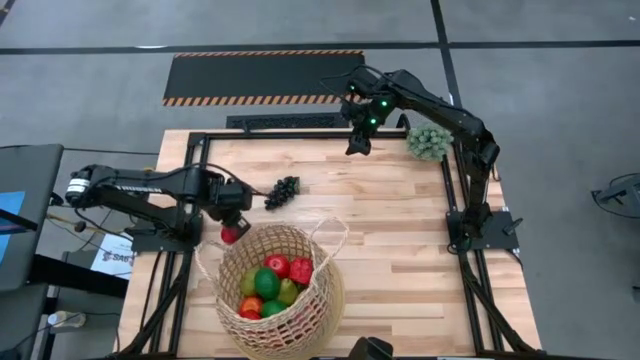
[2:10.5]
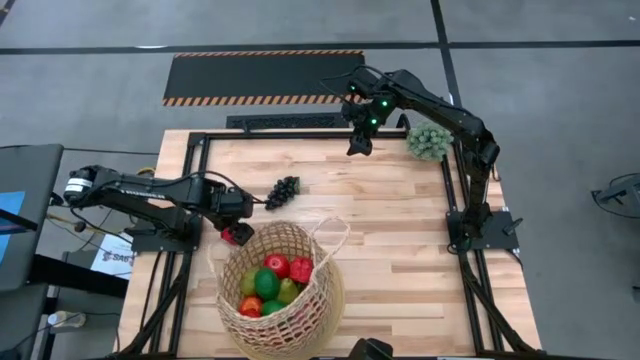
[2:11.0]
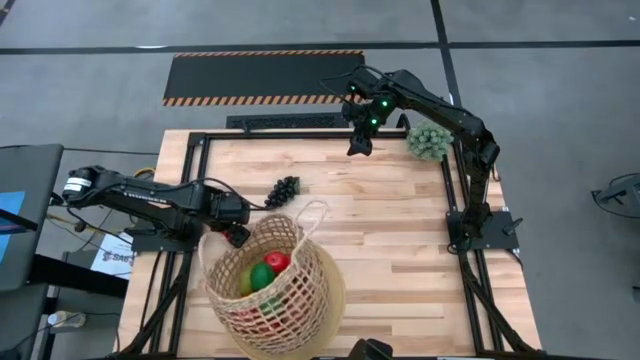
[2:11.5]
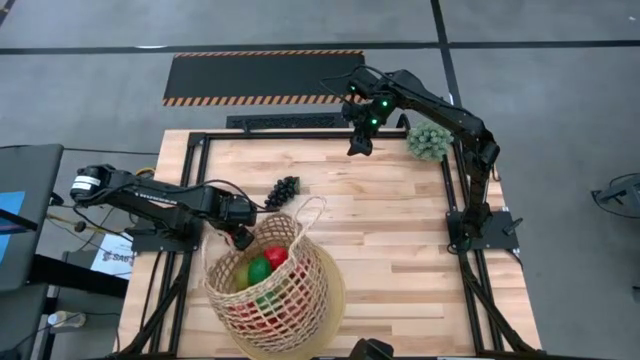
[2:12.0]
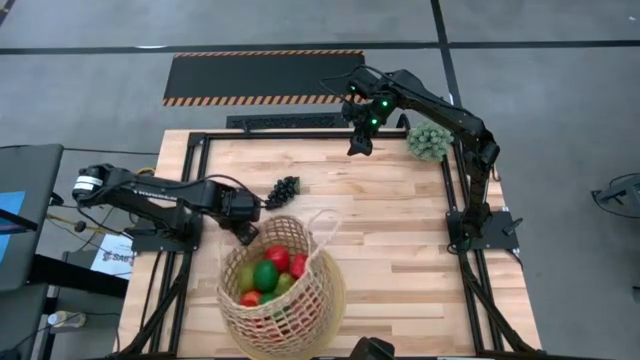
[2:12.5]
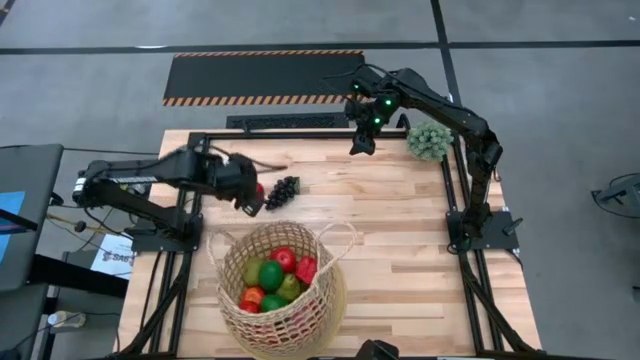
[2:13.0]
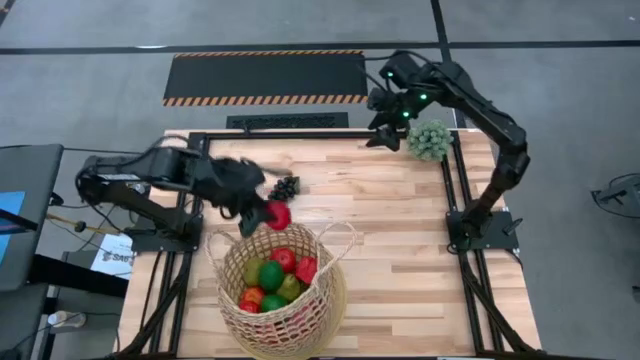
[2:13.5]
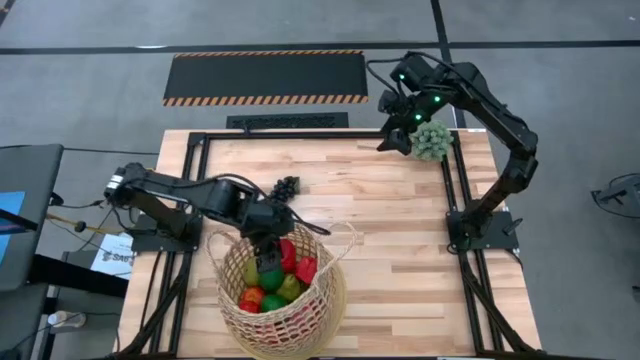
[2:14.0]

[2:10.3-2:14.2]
Task: Build produce basket
Put the tomato into the basket

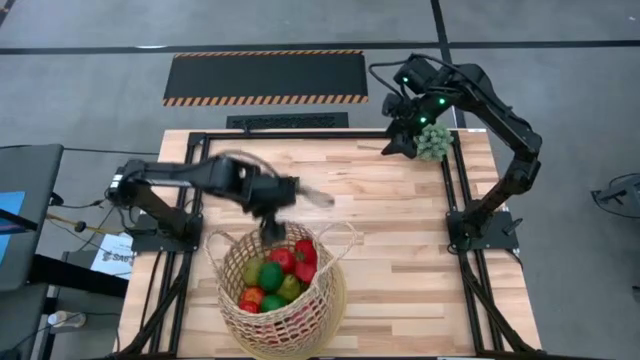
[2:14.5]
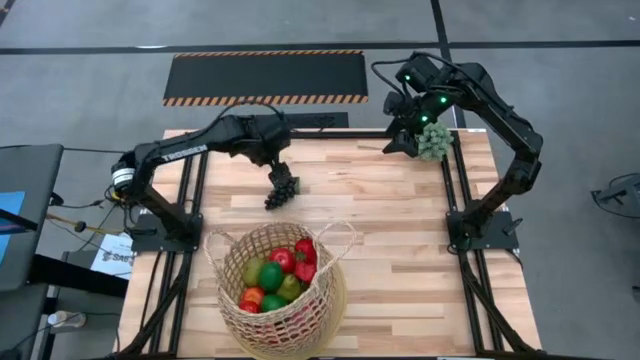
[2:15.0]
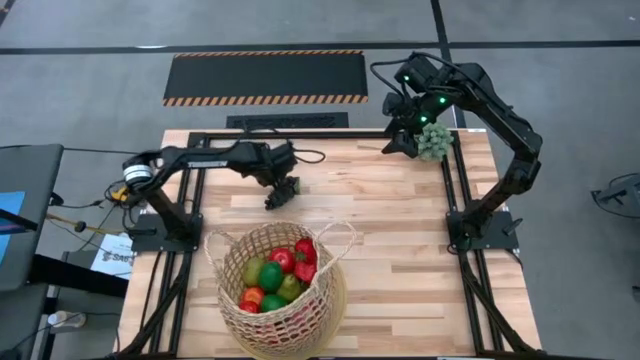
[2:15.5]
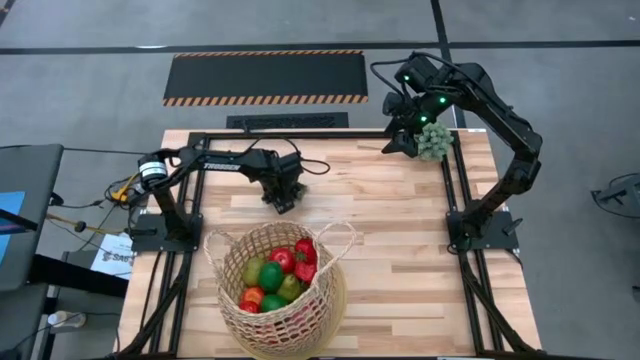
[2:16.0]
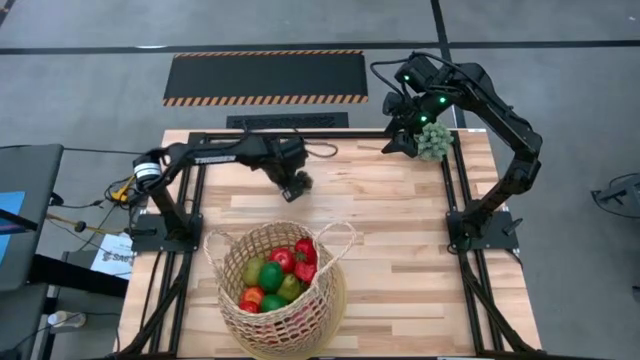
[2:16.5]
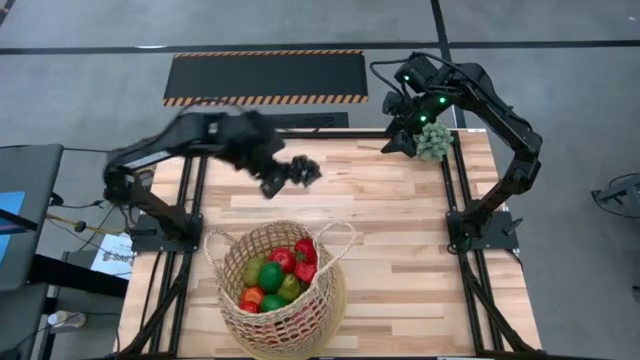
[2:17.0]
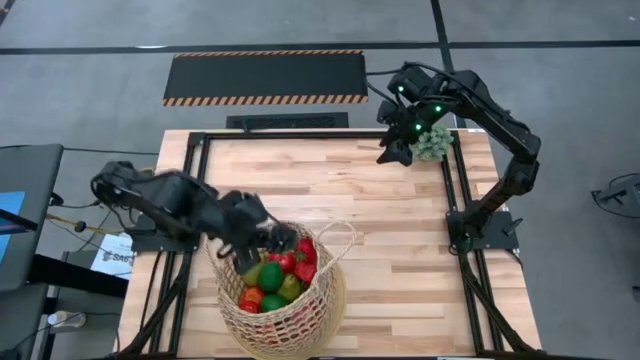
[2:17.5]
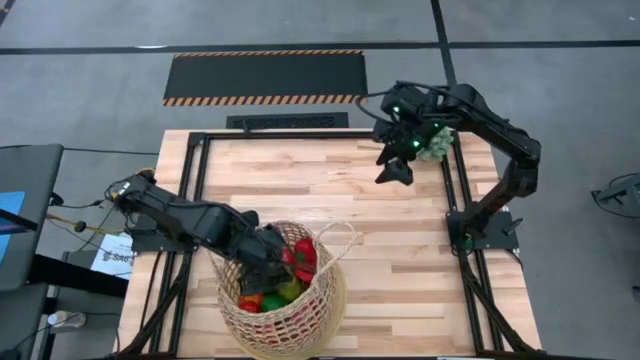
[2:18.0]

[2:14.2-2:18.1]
Put the grapes into the basket

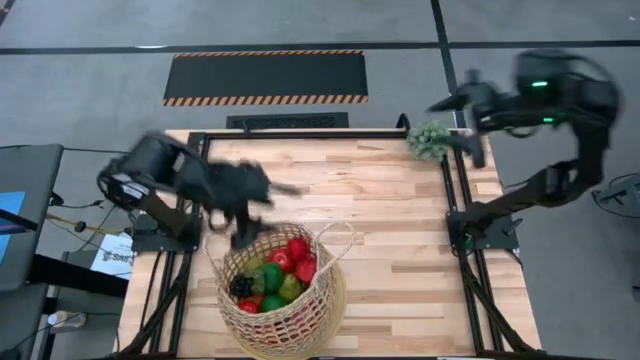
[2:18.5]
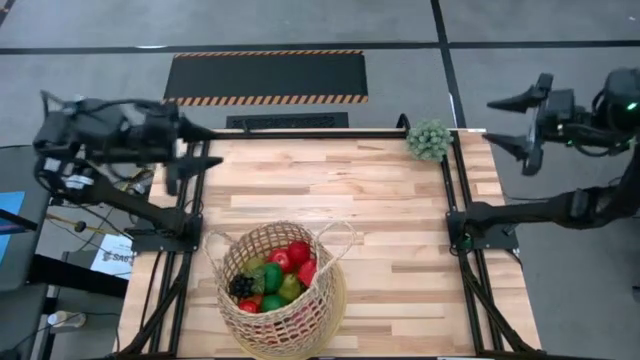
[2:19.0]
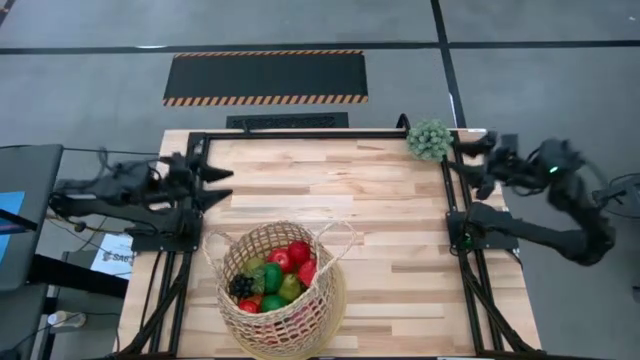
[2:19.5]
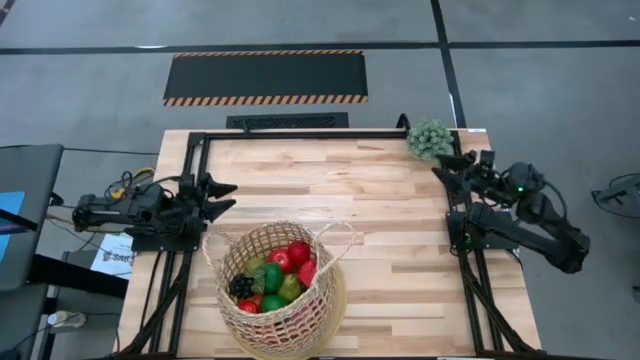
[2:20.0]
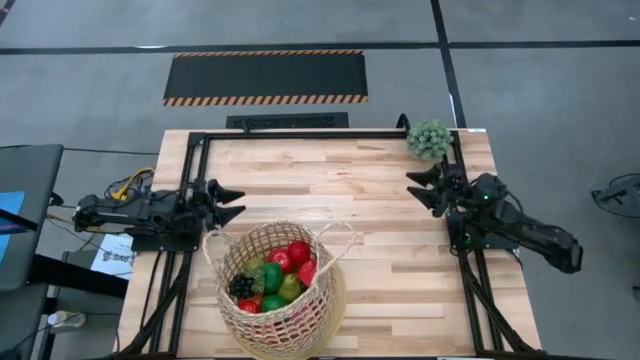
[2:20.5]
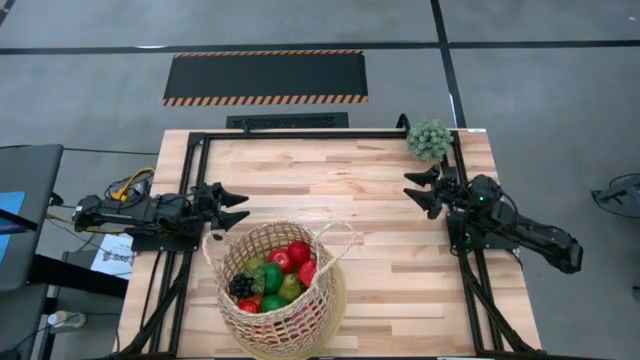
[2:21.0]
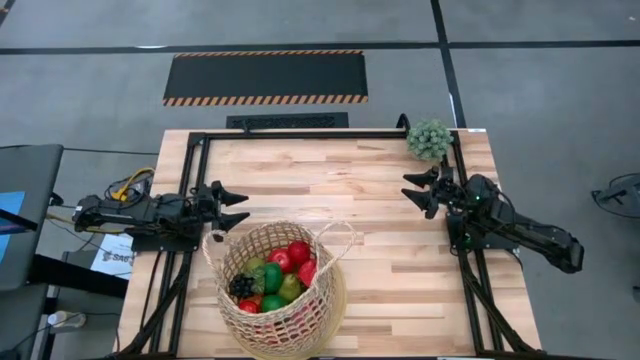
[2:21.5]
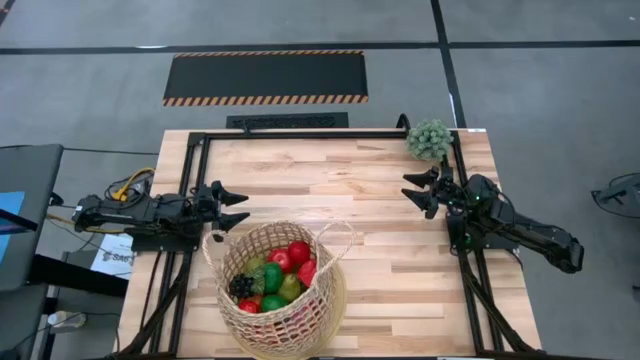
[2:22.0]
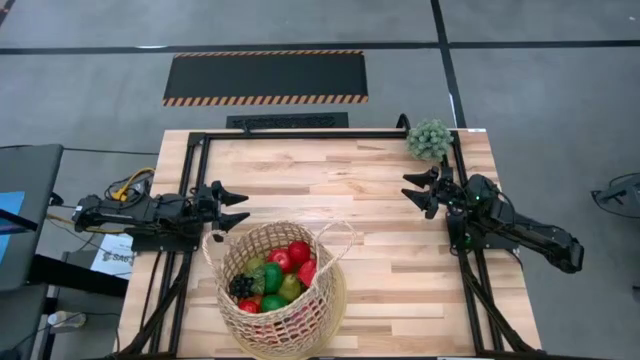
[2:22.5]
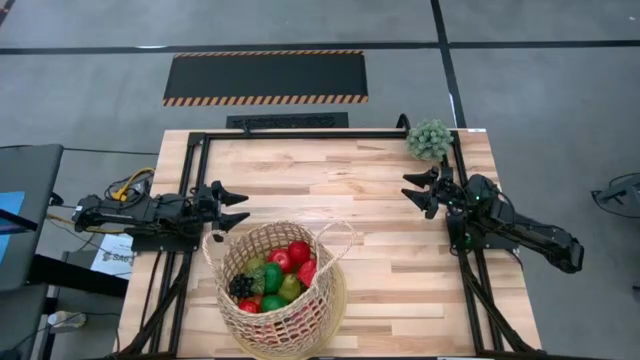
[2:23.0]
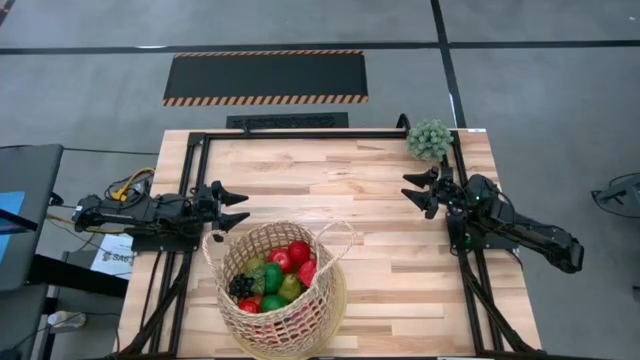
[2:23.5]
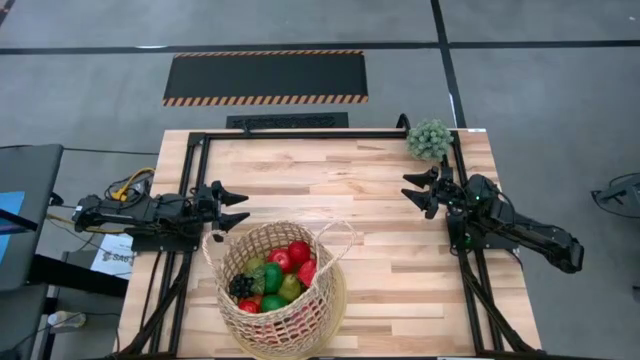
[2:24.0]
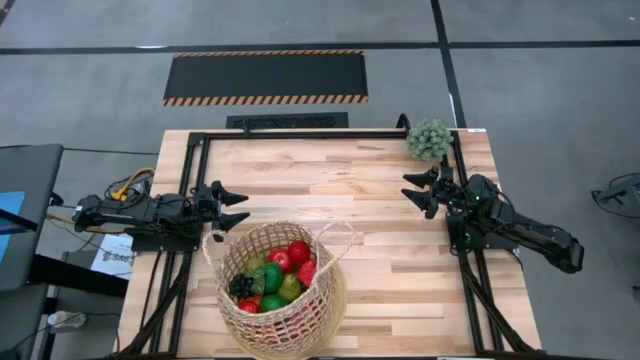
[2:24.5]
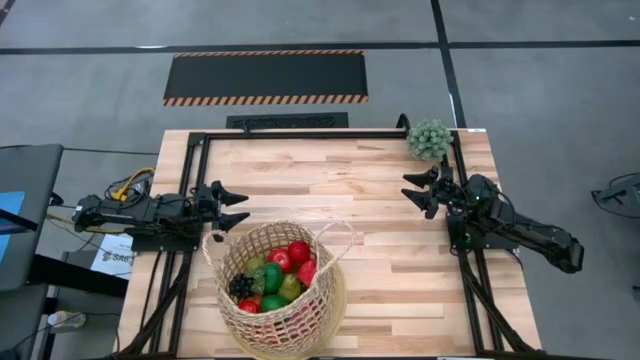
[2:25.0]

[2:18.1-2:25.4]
Return to Home Position

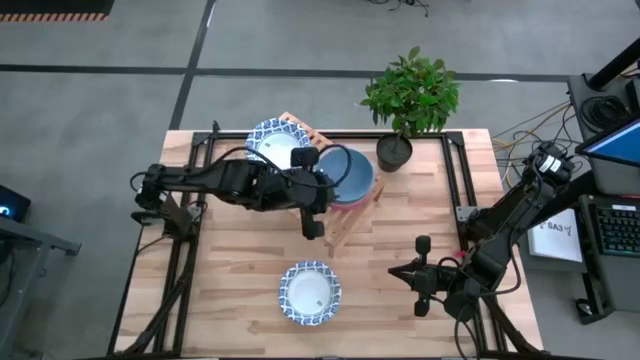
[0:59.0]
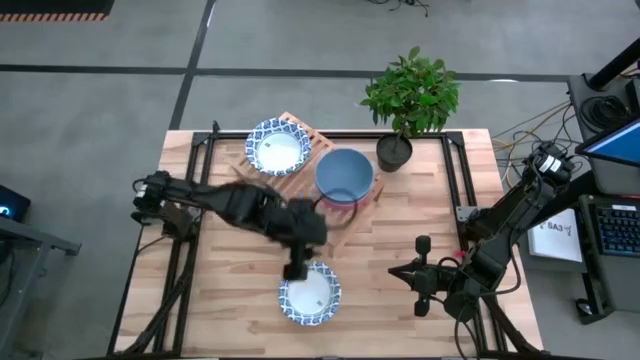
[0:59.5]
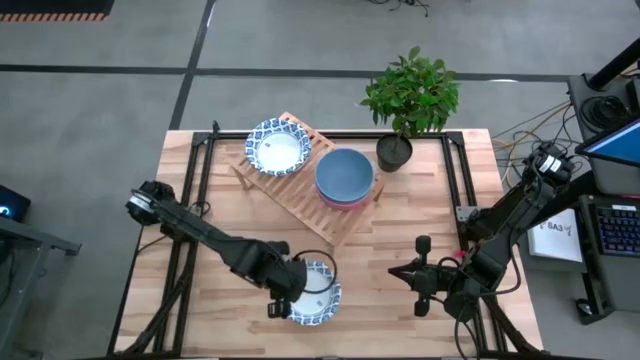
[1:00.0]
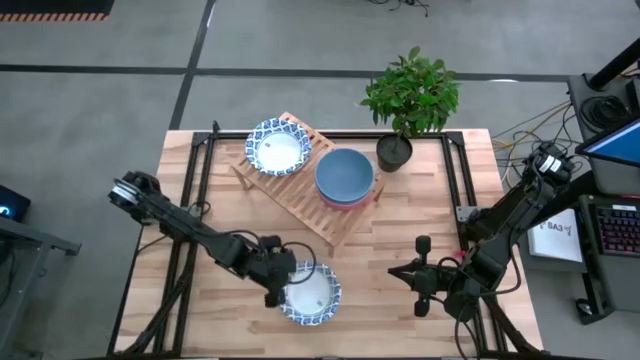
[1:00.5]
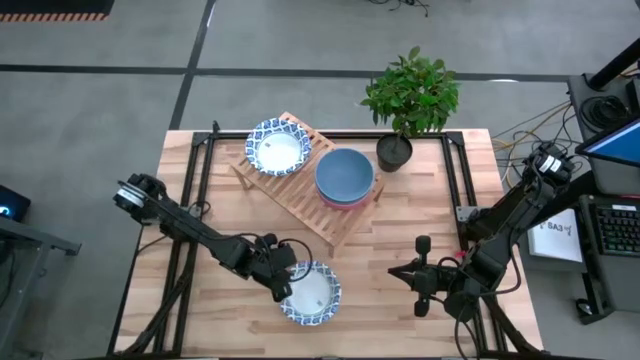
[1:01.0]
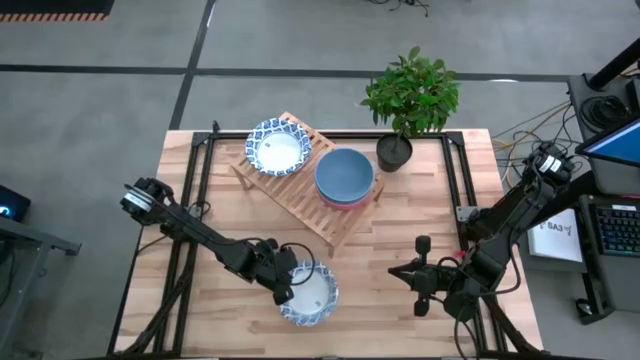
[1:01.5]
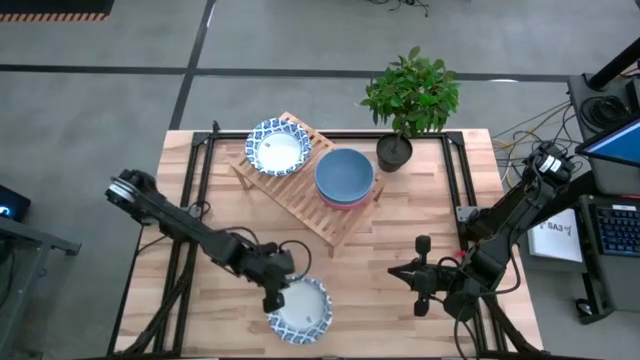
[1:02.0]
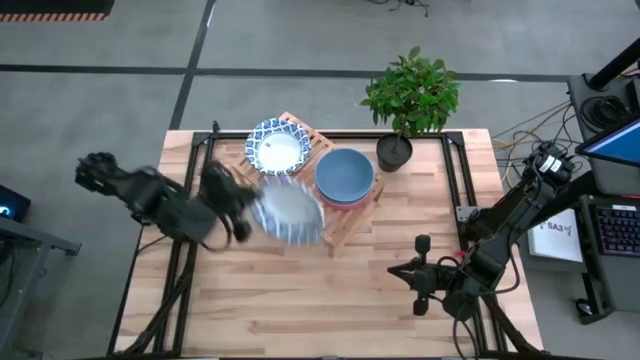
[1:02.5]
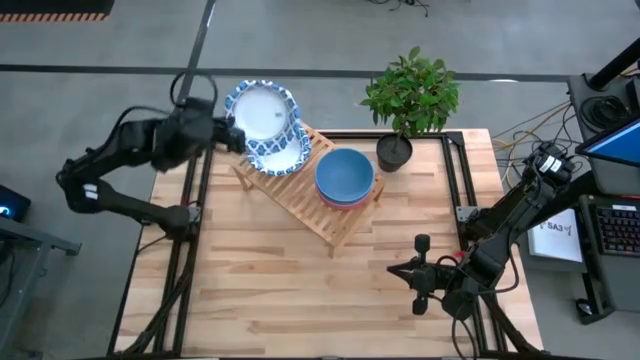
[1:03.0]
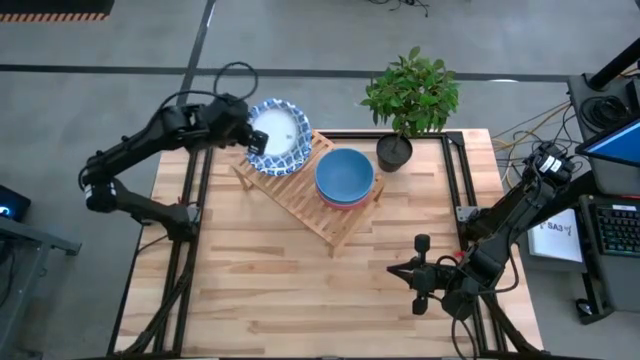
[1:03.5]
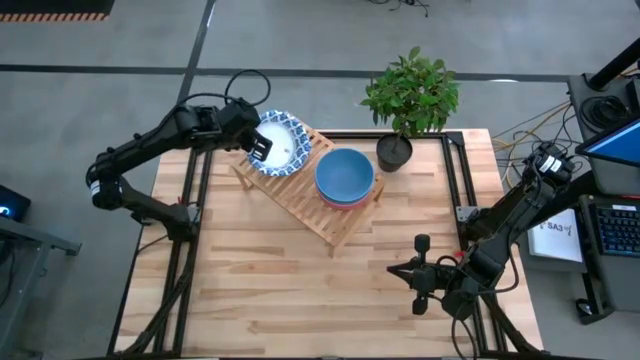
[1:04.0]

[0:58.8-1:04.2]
Task: Place and stack bowls onto a shelf
Stack the white bowl on top of the white bowl on the shelf

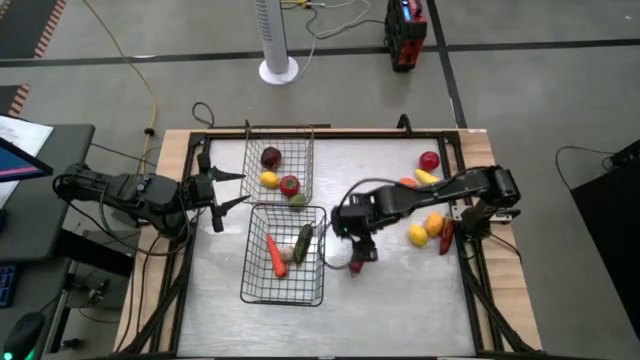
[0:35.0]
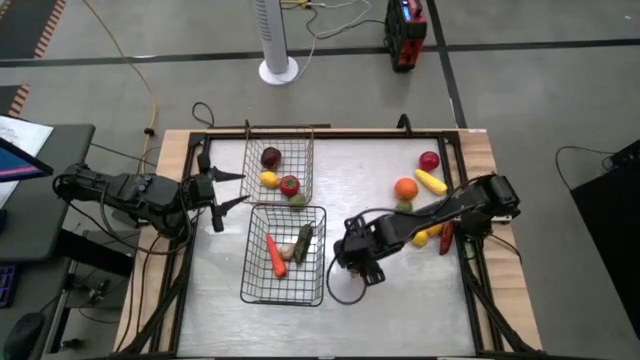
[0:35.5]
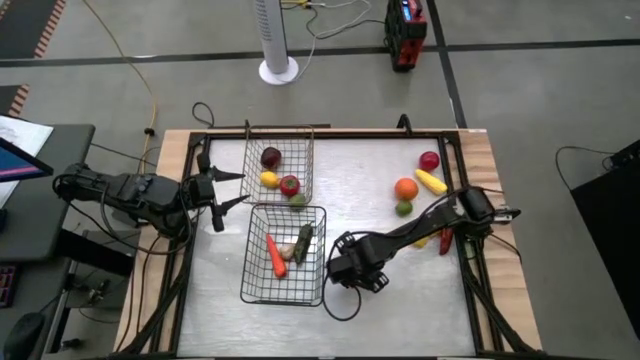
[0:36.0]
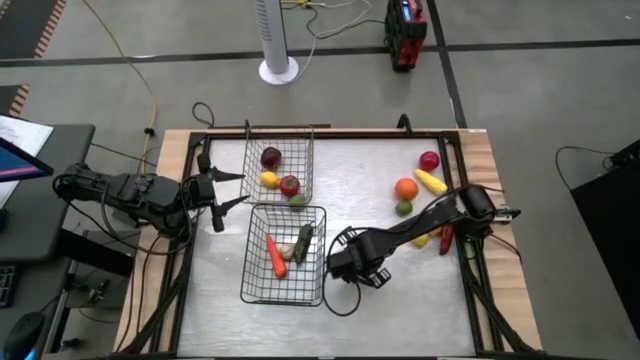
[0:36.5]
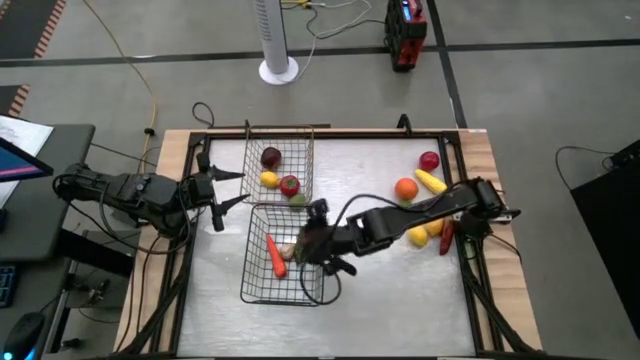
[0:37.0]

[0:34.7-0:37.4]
Task: Sort produce into baskets
Put the left red chili pepper into the black wire basket
